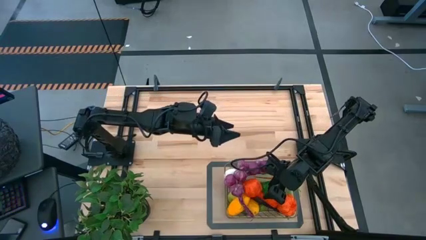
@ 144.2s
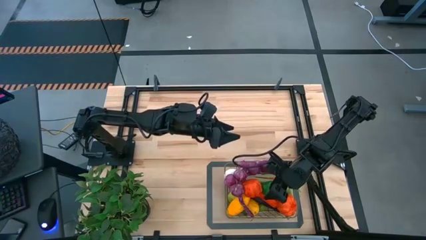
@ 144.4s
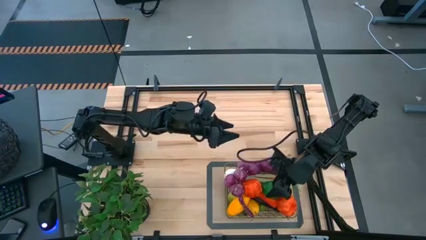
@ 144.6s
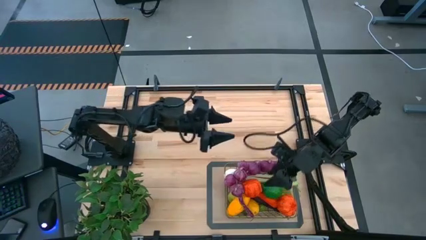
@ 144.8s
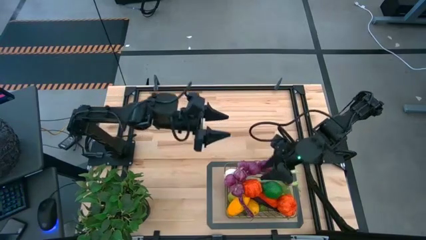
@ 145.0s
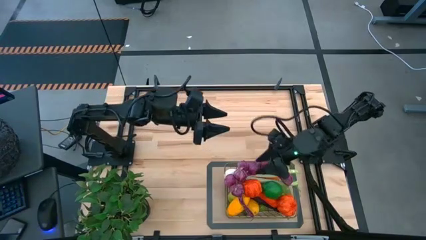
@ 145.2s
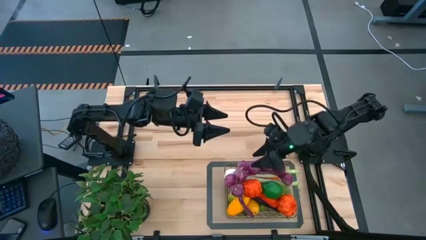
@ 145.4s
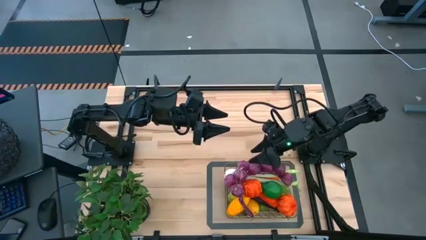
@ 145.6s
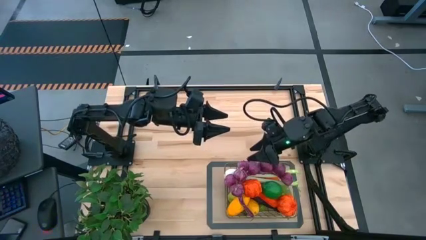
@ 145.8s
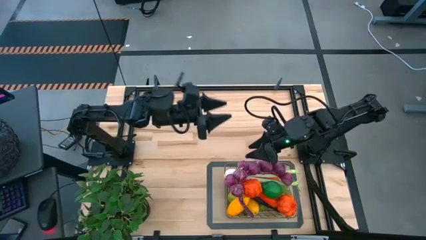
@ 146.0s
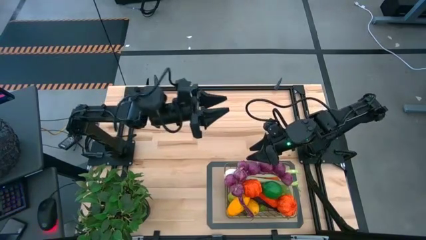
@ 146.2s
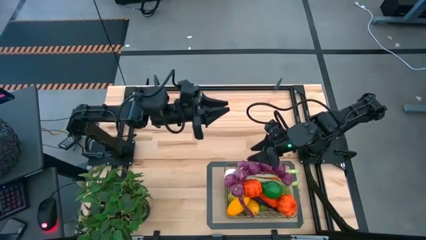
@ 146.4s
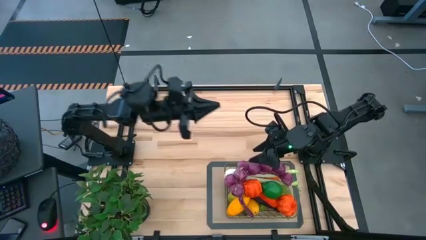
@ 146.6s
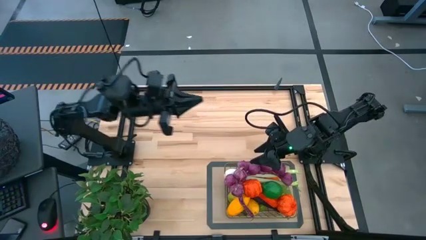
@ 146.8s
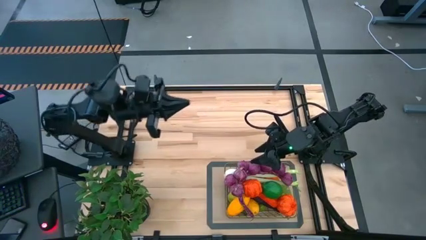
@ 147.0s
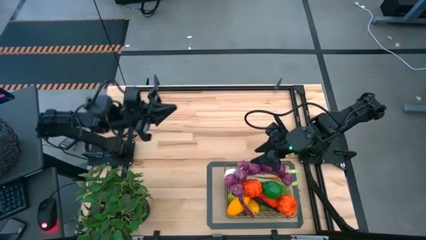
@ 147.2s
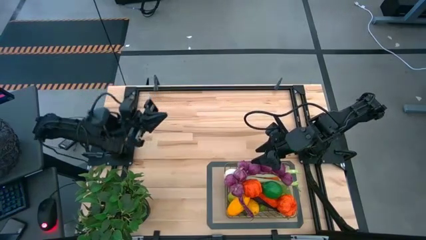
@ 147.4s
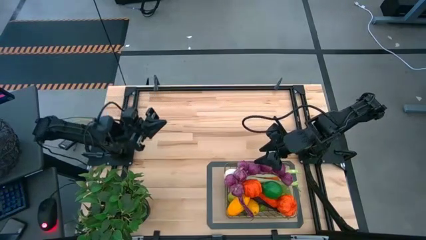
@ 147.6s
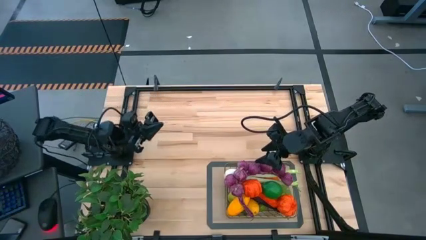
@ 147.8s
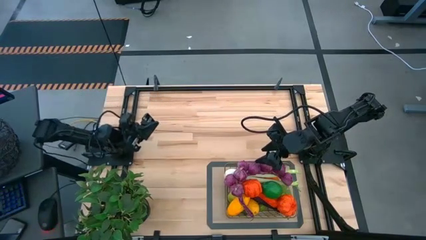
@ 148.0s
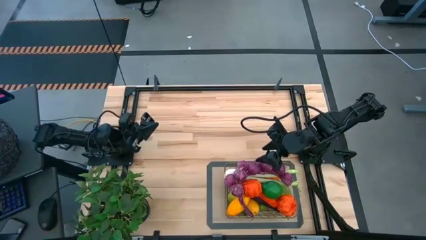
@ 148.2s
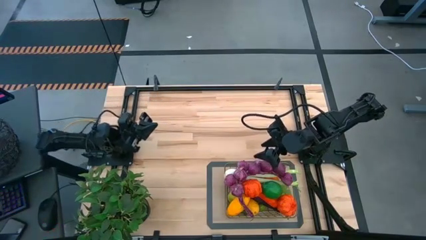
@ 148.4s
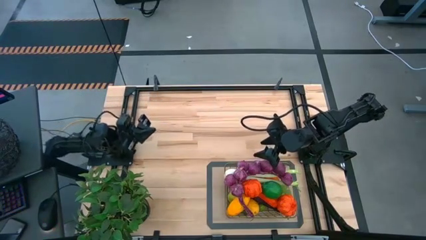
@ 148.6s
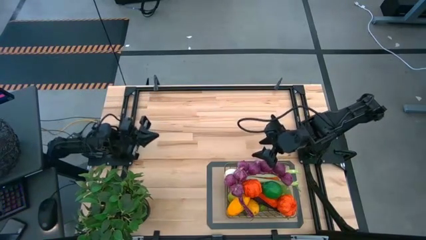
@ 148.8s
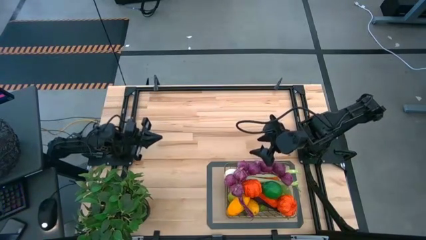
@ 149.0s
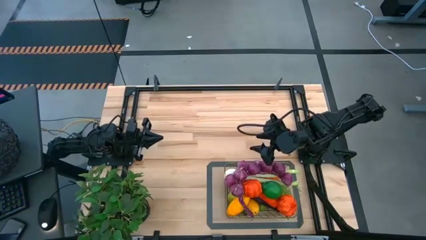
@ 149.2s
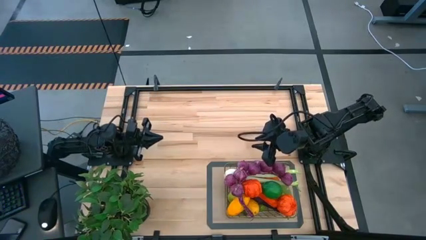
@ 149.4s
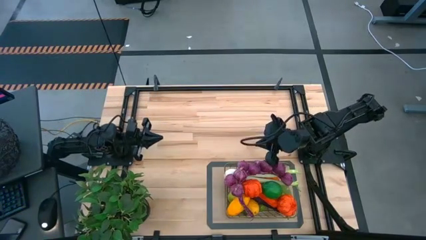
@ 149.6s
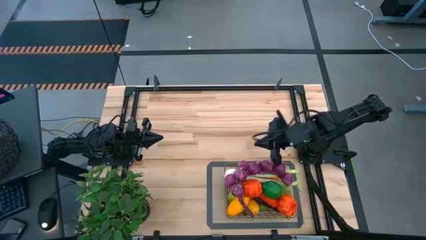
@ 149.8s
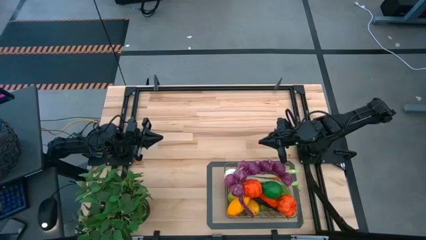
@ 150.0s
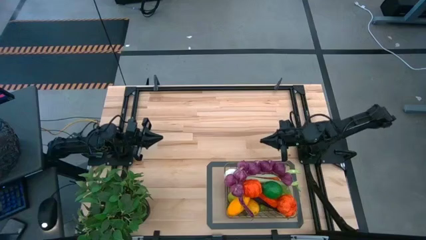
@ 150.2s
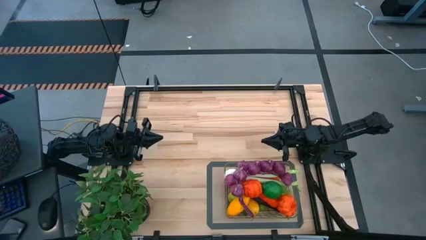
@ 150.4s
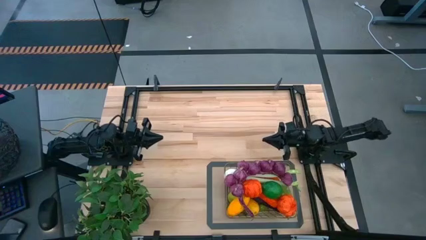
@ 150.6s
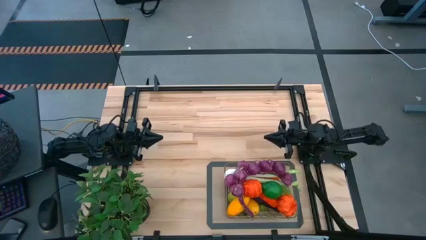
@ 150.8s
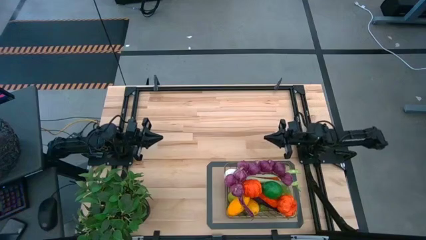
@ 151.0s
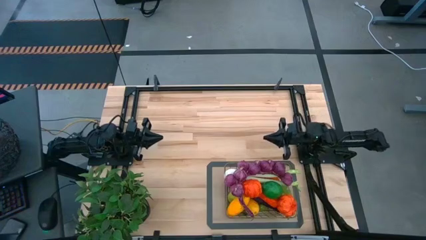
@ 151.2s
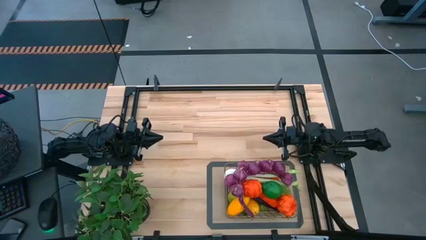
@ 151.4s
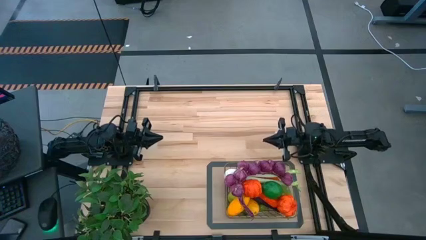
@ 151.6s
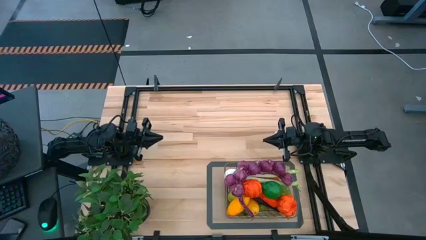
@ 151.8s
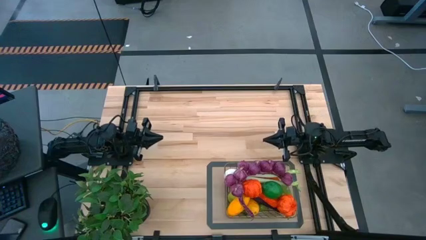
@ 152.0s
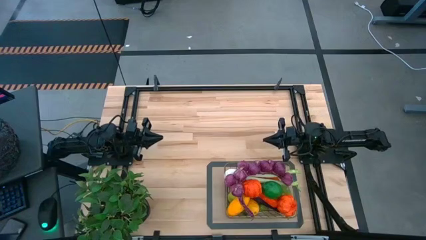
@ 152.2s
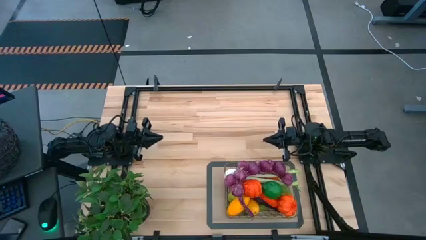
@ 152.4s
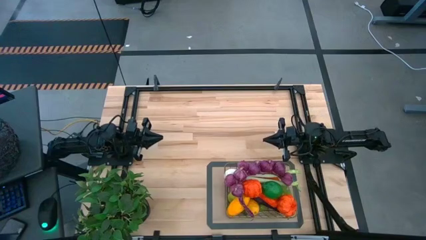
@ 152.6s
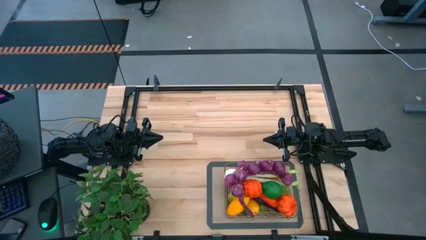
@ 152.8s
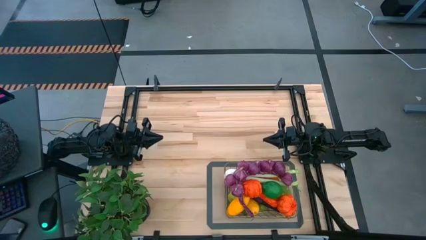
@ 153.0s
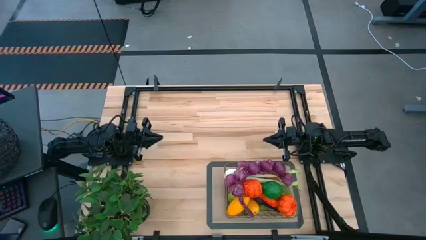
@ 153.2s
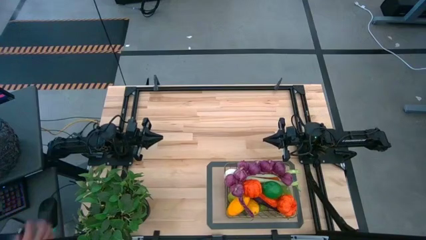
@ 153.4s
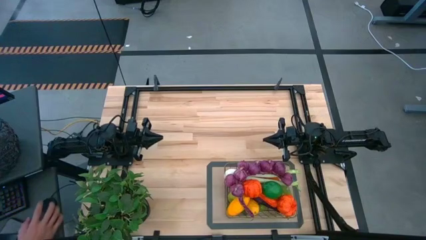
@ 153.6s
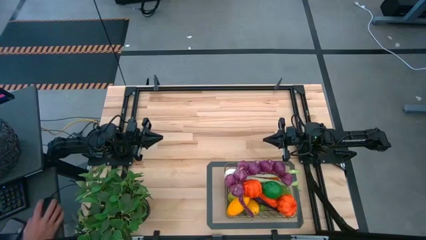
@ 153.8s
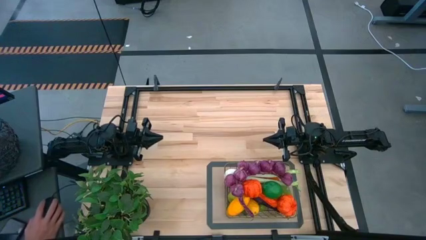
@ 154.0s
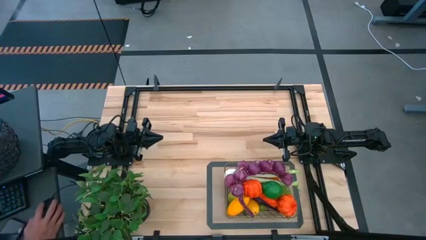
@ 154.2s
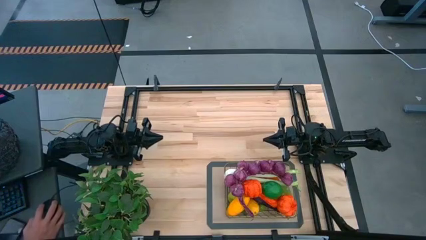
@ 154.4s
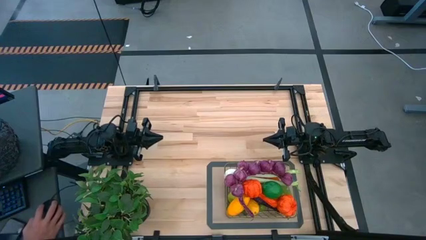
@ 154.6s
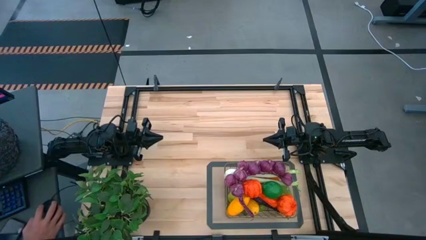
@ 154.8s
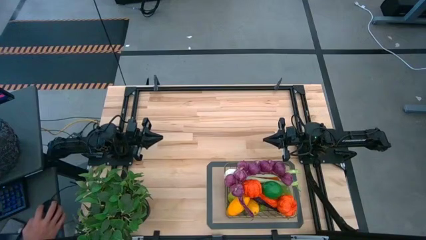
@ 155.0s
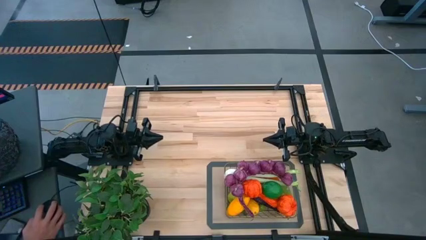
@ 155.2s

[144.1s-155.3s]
Task: Build produce basket
Return to Home Position
